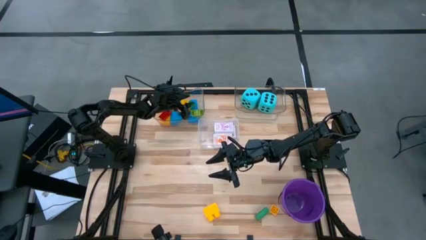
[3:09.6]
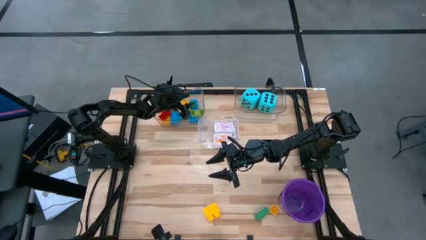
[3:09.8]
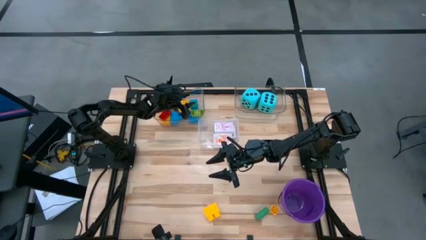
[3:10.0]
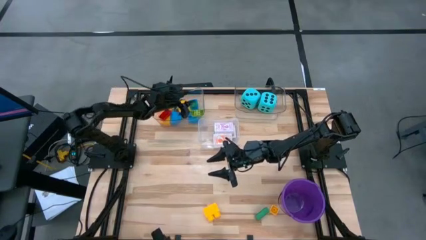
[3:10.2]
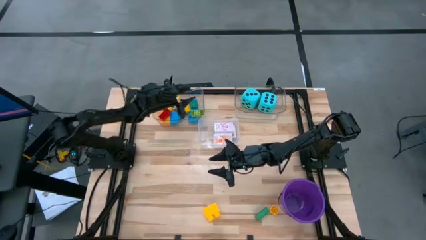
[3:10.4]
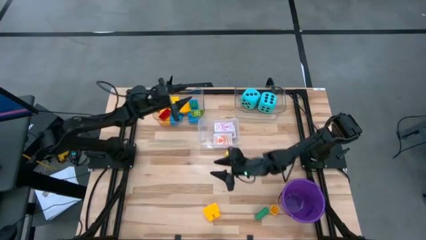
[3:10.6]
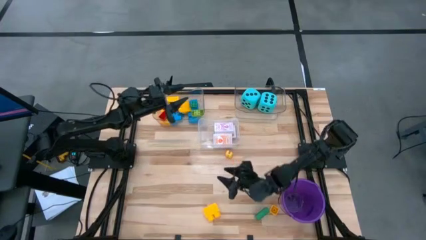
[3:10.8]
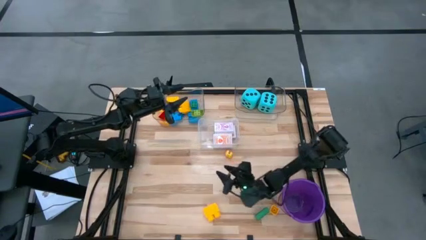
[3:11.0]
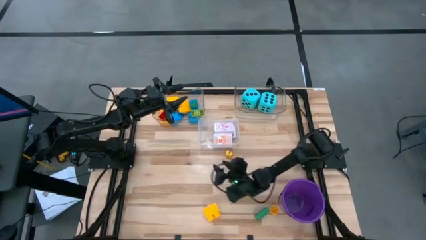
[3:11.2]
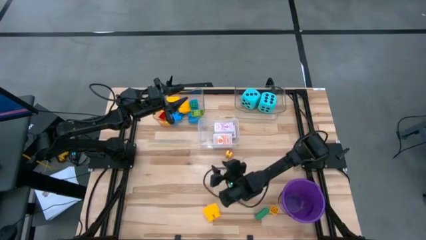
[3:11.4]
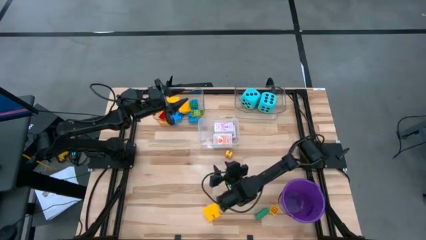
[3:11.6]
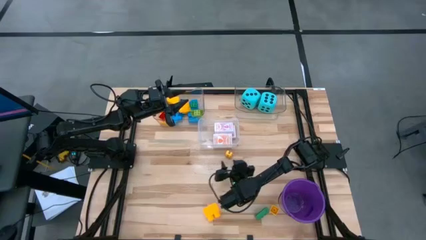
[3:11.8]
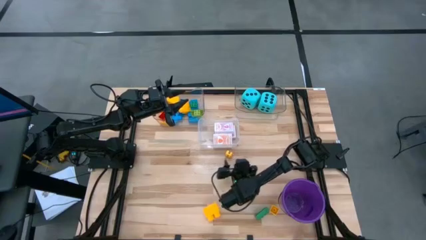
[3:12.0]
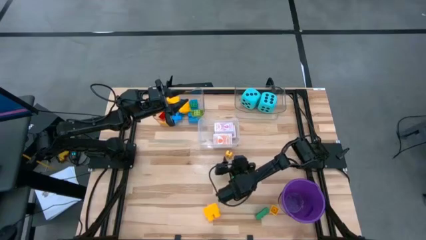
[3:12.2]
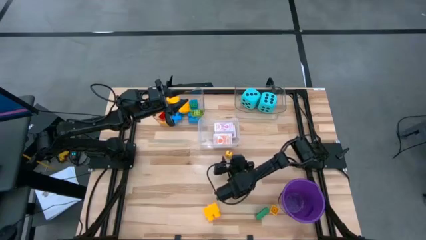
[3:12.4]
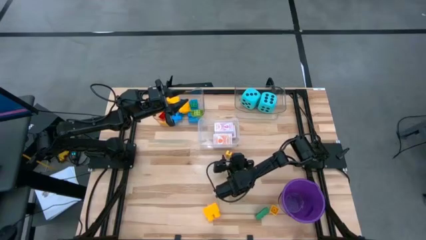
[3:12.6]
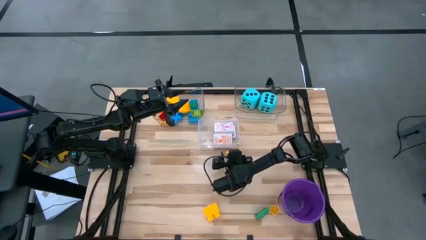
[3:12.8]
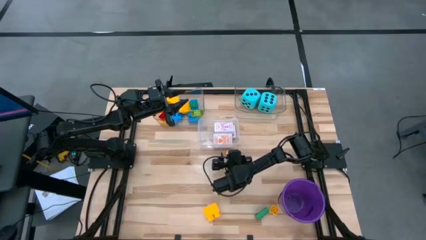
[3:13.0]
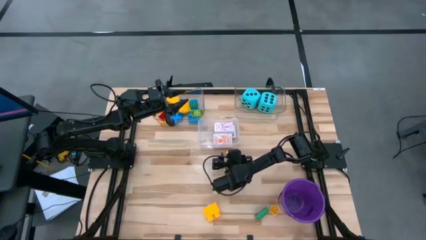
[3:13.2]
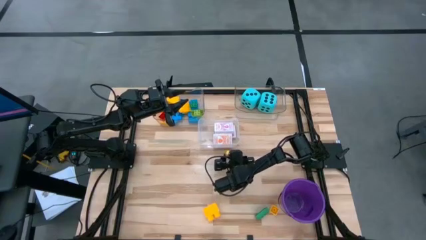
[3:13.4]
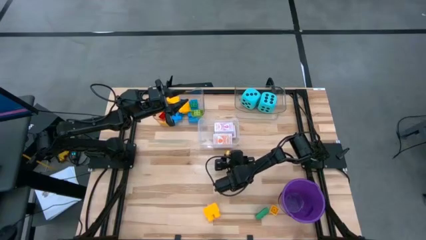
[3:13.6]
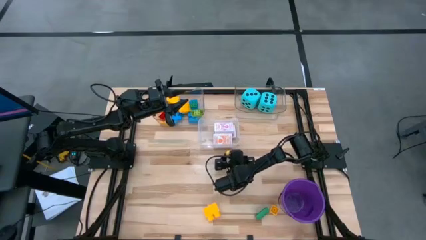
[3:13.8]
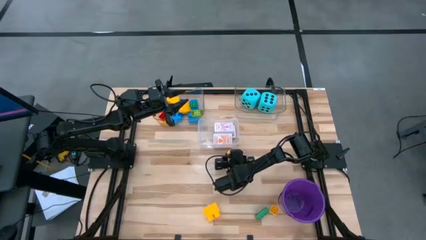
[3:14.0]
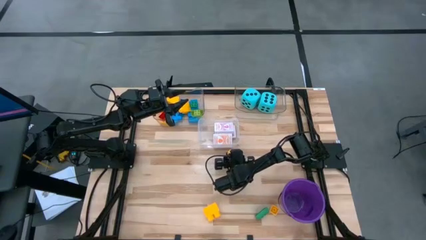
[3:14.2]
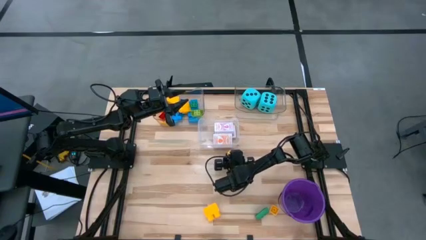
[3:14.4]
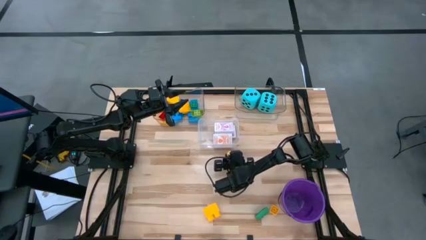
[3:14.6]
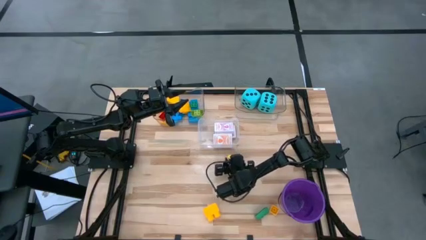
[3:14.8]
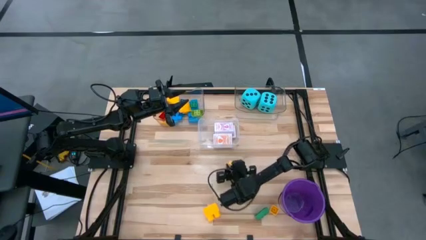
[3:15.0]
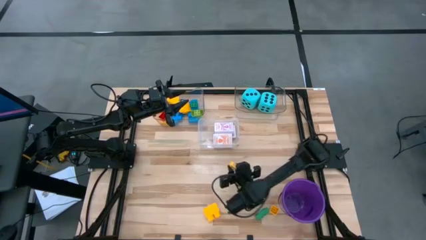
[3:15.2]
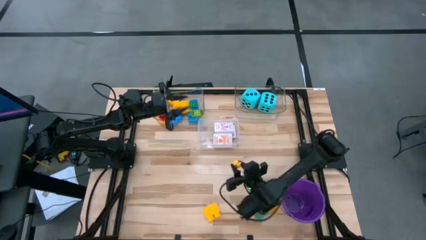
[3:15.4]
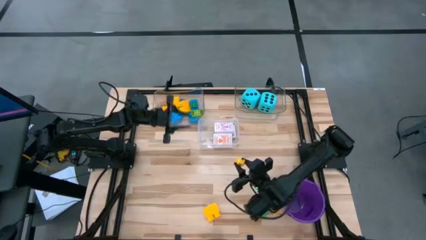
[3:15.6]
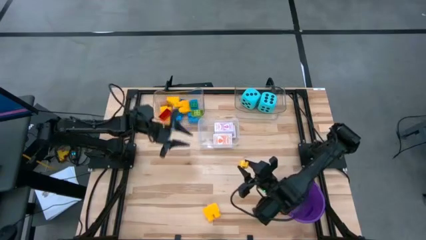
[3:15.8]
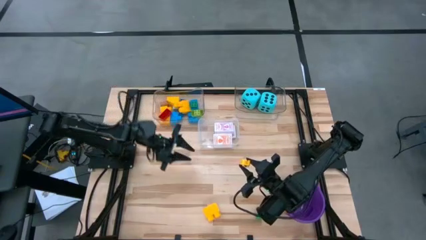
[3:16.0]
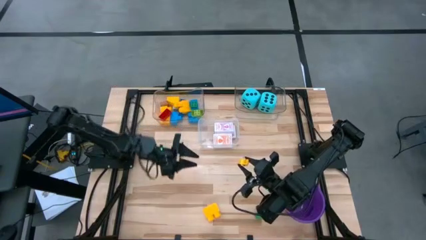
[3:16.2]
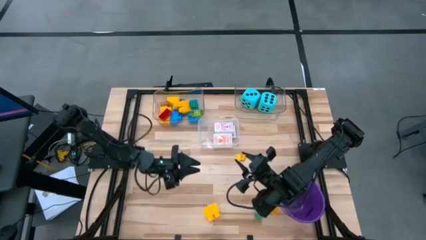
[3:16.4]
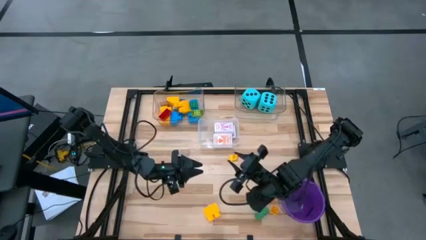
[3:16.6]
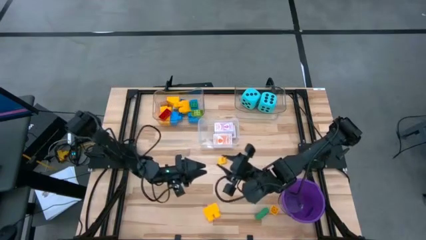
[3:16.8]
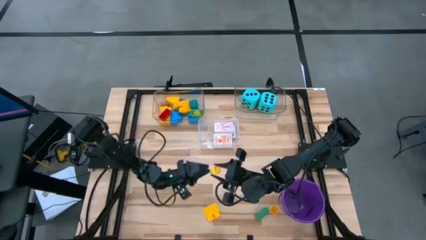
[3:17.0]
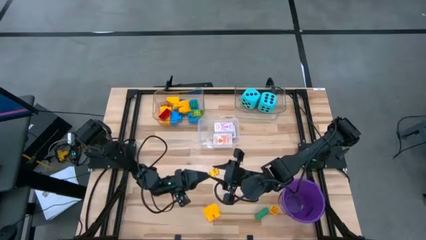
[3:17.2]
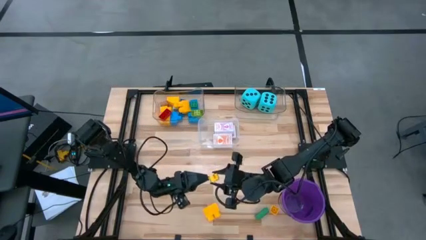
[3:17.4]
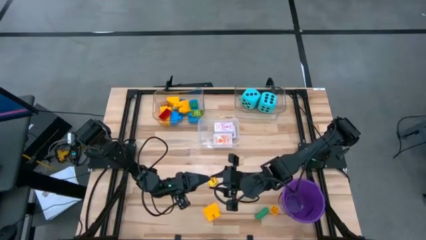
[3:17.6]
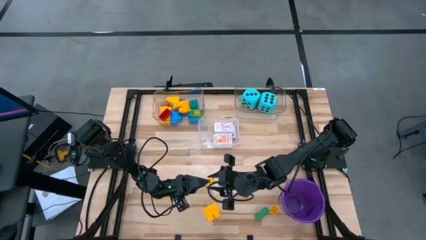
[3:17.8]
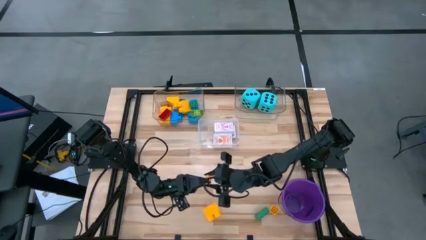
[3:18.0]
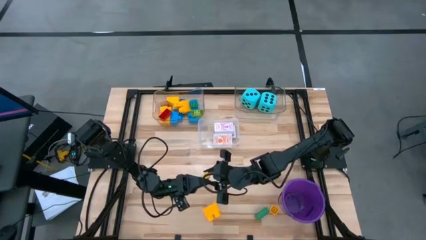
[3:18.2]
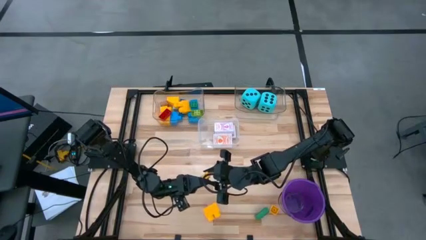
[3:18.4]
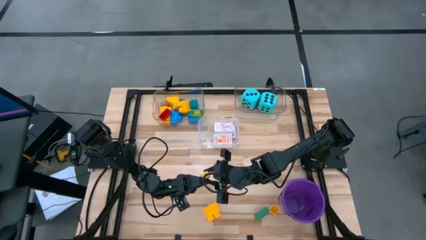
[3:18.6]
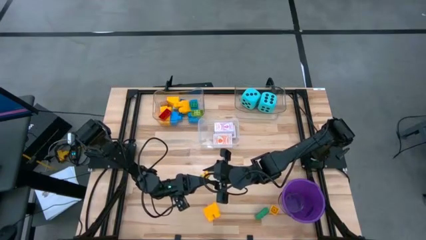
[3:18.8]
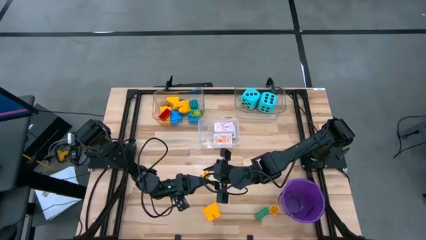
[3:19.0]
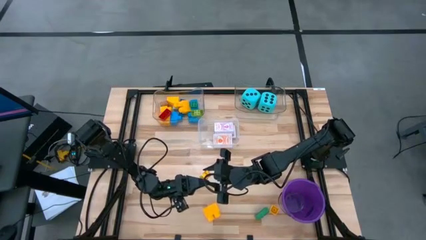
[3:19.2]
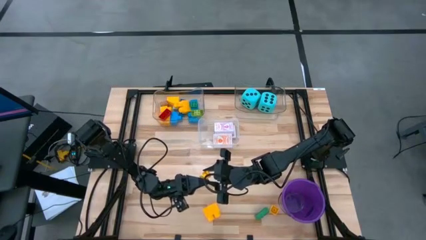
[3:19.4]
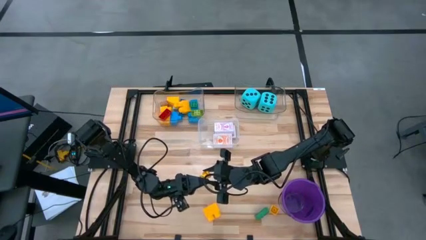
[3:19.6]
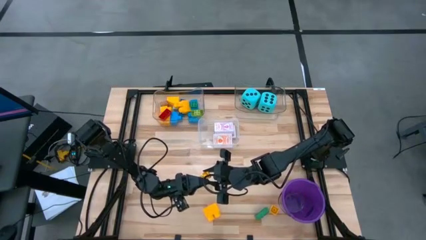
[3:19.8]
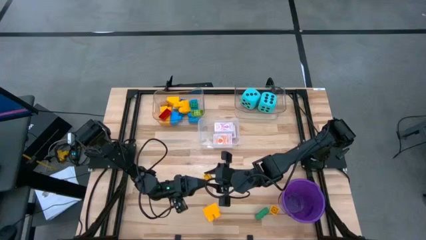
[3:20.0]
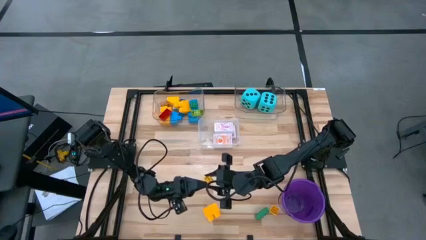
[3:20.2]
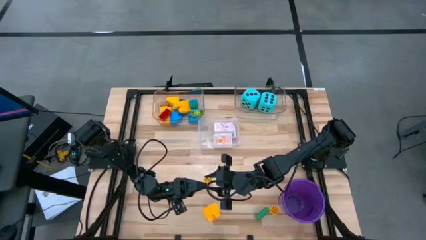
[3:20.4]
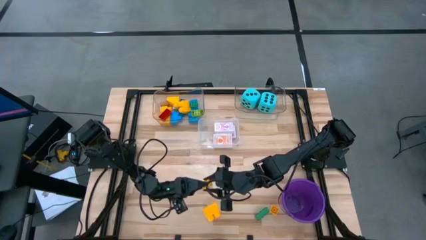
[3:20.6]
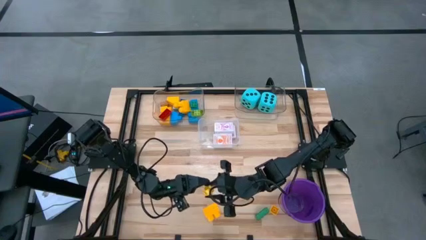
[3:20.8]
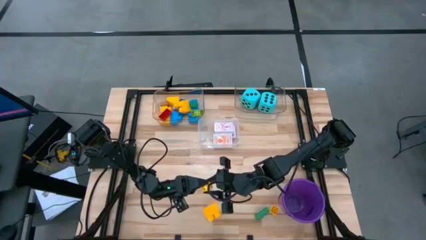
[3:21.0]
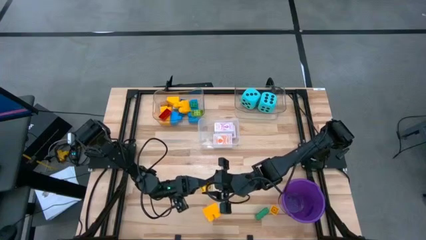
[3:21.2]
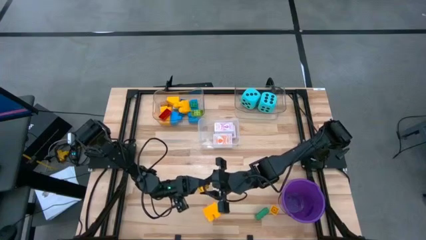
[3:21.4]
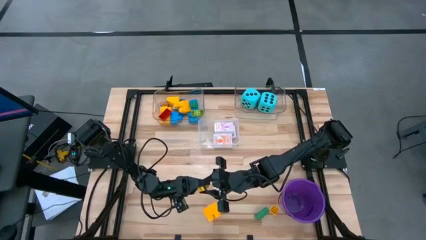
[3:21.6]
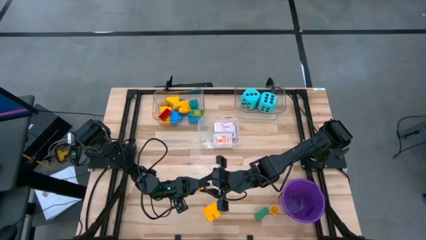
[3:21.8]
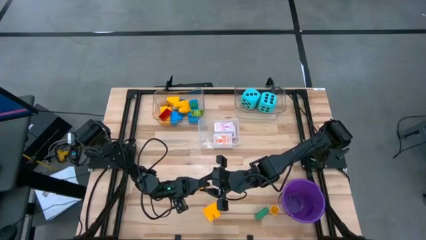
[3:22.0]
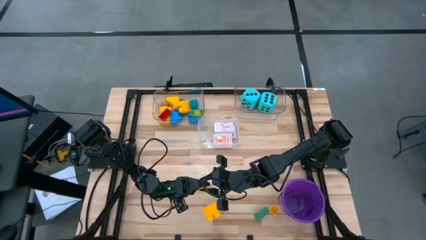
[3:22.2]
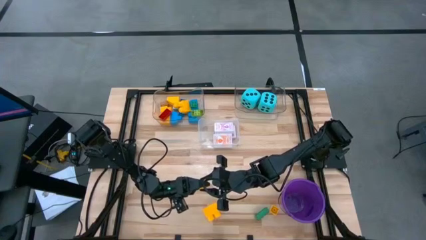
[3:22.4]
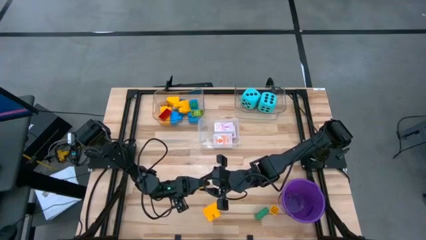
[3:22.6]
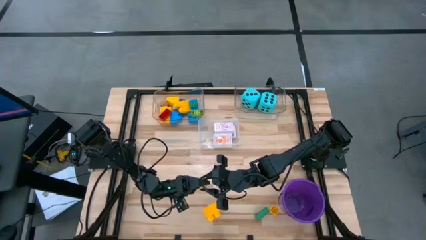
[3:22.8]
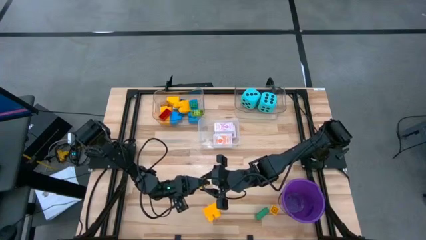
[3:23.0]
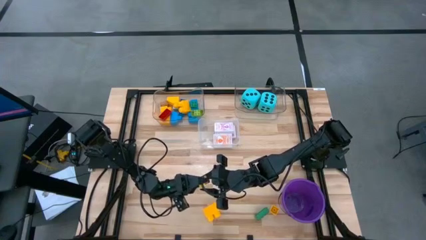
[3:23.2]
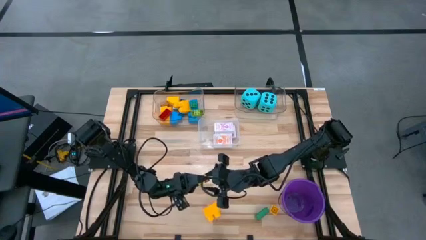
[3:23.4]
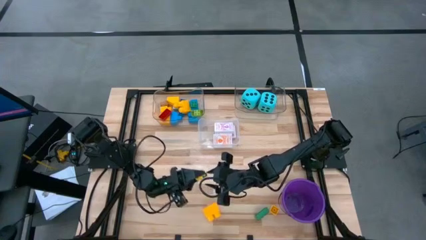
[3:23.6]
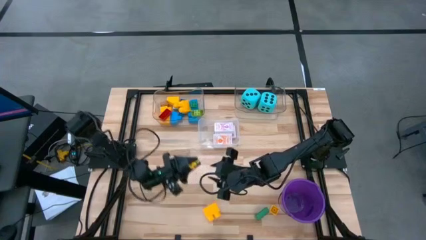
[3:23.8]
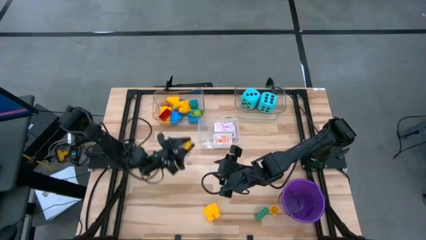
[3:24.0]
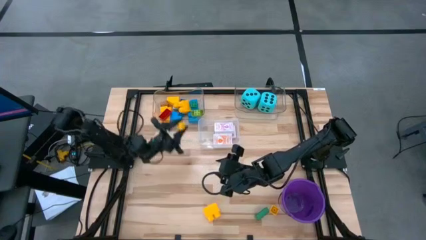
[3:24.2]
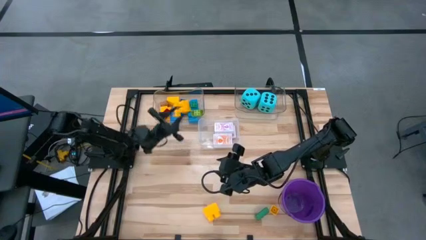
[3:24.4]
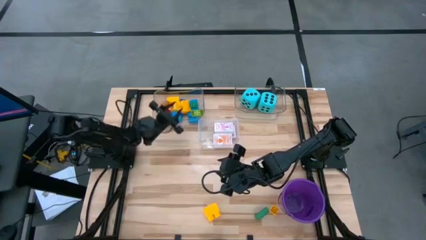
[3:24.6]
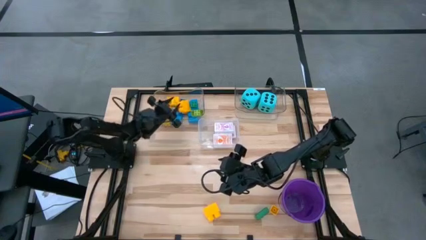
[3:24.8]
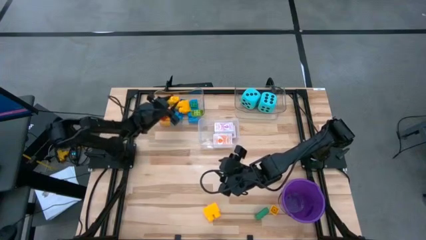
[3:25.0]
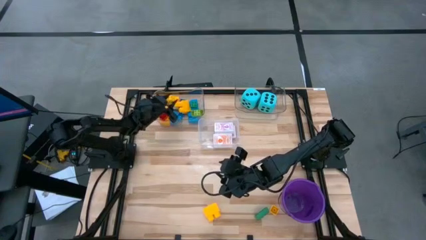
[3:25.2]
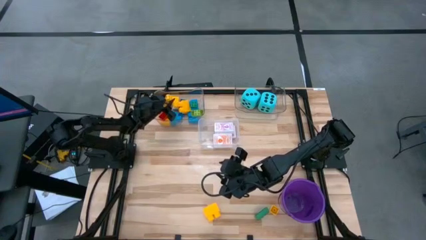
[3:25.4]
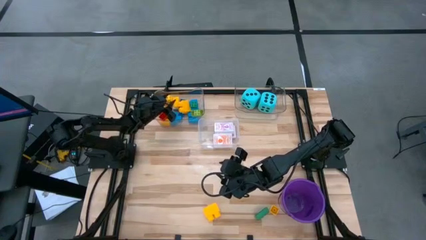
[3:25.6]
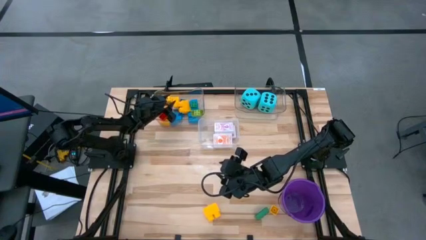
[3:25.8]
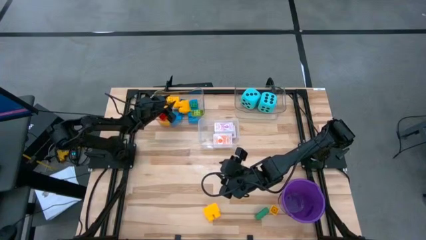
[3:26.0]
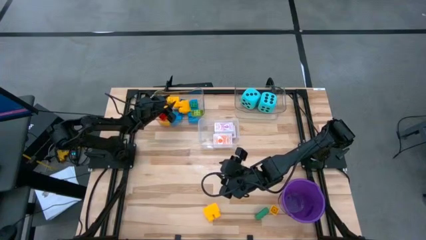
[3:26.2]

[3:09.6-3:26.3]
Task: Pick & Place Toys
Put the yellow game piece into the top left transparent bin
